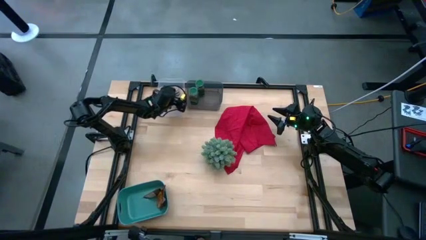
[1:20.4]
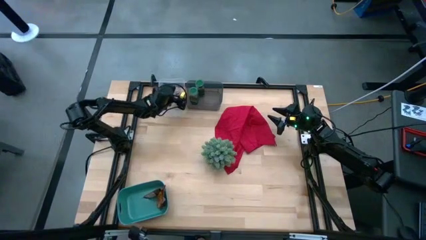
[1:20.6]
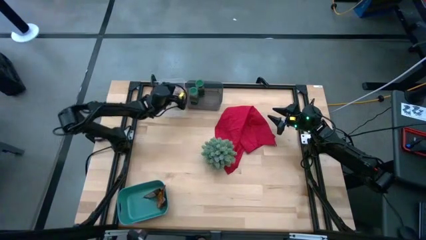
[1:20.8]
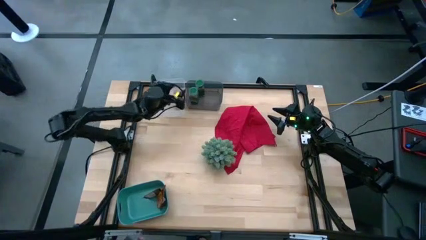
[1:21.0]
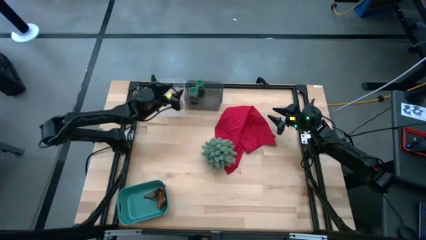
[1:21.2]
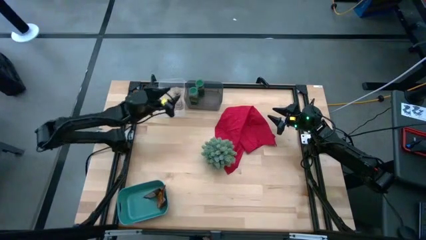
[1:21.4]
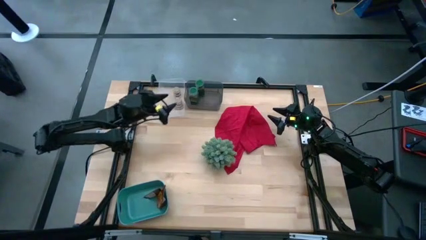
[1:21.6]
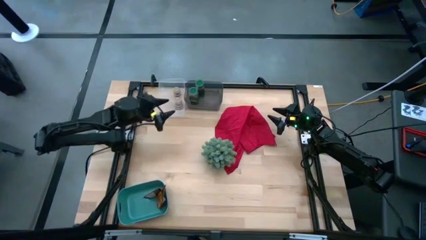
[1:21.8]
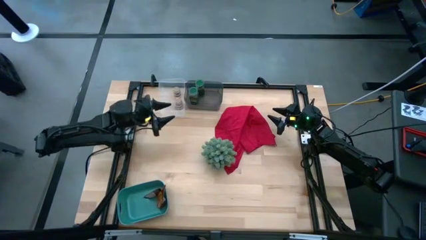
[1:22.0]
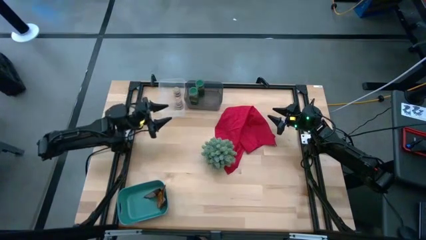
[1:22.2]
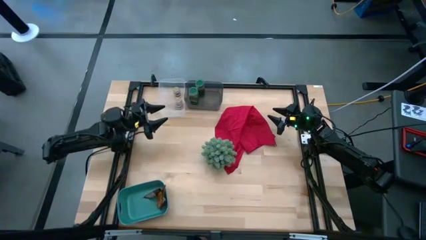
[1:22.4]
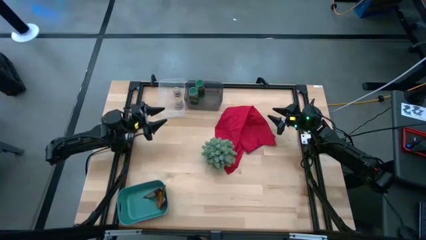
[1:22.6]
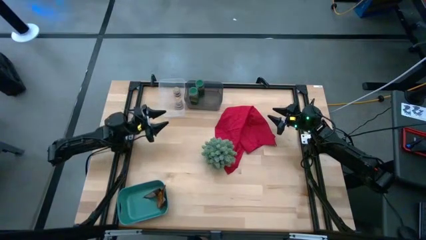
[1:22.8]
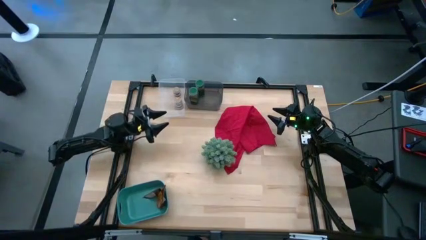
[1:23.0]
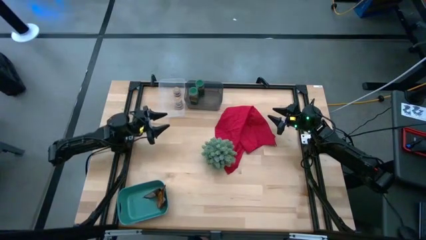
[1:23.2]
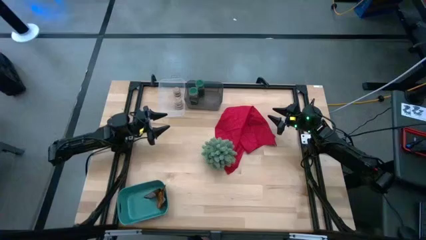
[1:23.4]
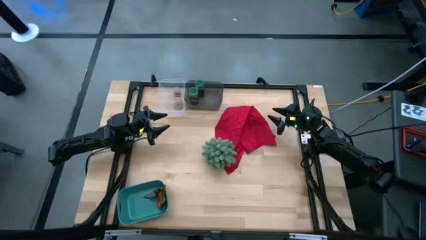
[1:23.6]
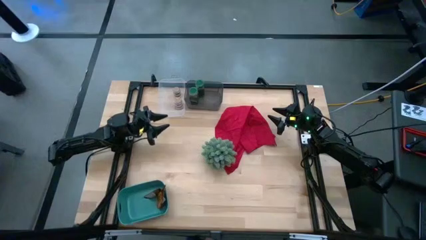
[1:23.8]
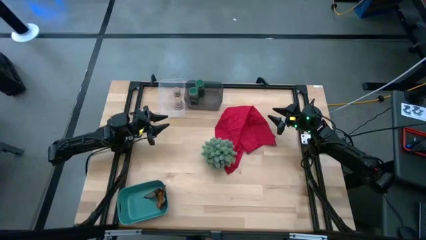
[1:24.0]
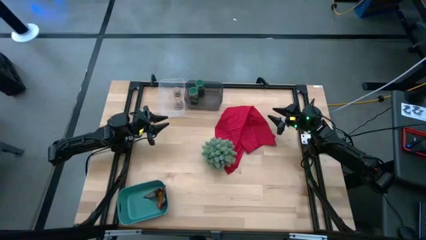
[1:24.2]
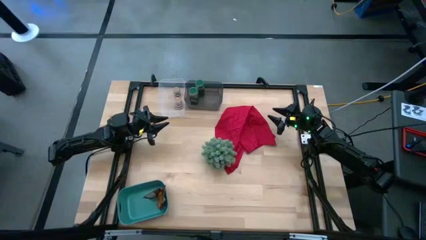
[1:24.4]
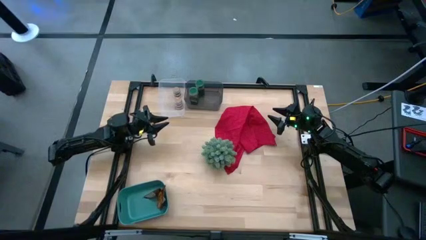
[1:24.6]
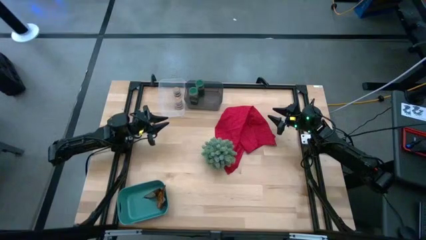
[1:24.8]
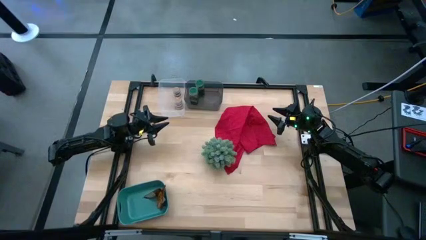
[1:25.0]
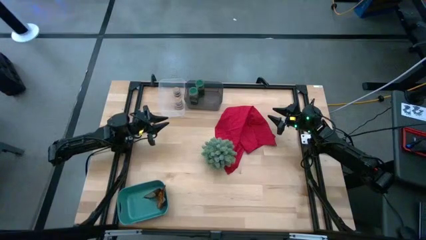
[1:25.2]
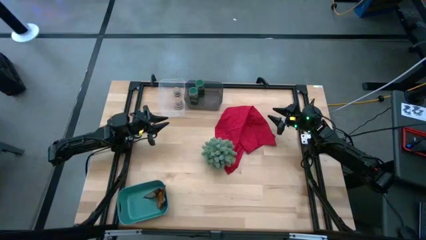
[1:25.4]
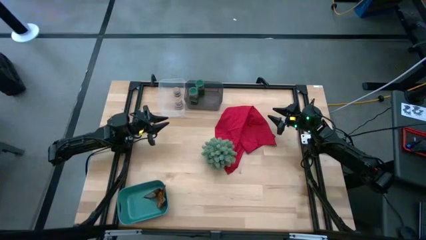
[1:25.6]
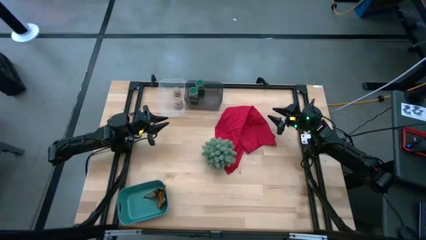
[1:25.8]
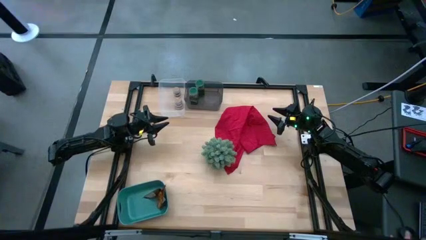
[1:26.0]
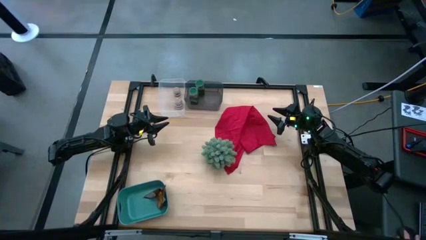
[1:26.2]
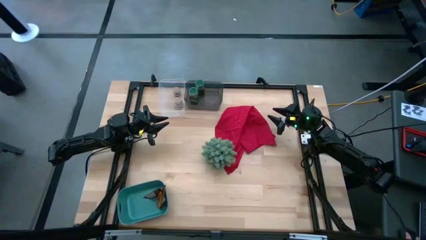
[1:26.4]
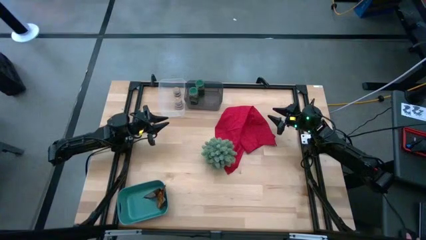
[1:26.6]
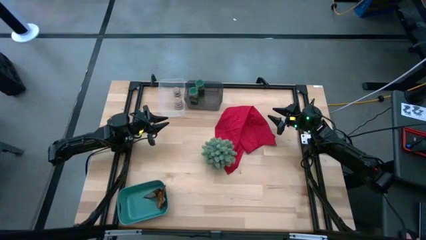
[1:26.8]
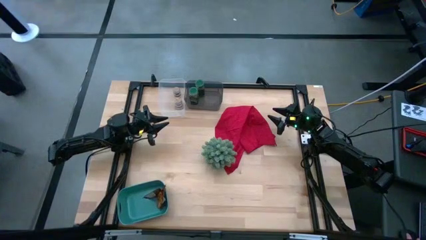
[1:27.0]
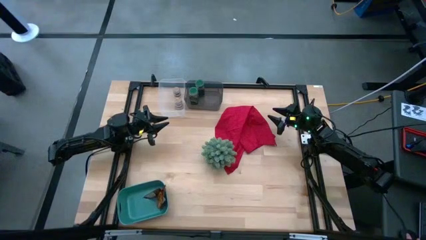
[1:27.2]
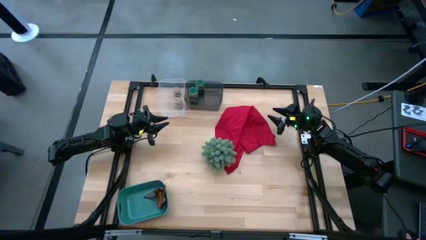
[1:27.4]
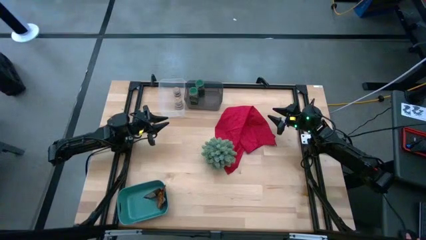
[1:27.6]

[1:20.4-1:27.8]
Task: Sort spices by type
Return to Home Position

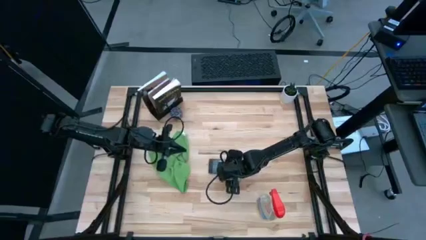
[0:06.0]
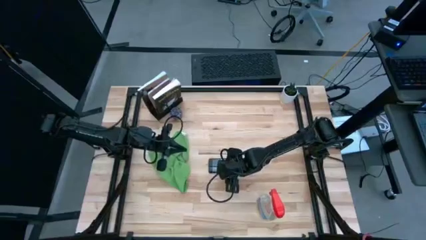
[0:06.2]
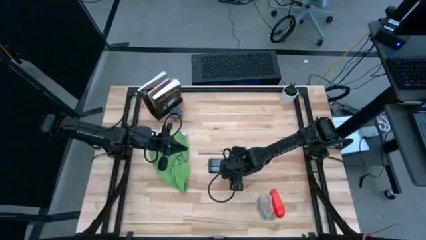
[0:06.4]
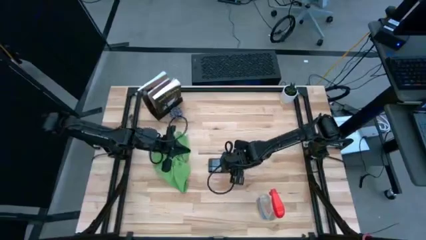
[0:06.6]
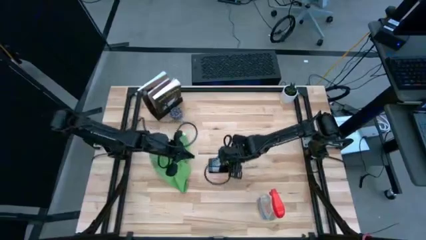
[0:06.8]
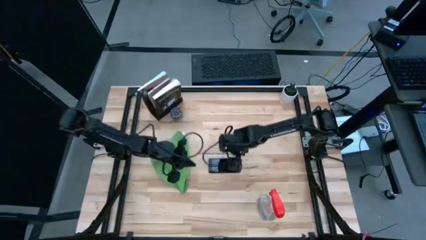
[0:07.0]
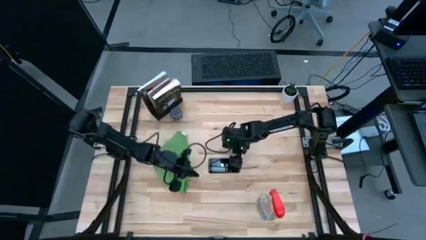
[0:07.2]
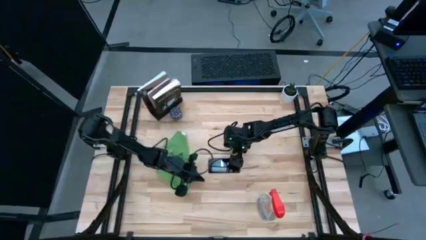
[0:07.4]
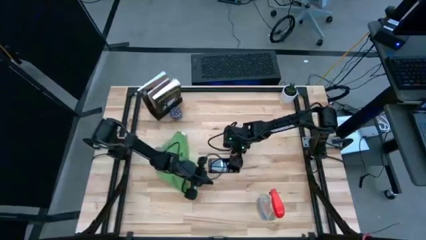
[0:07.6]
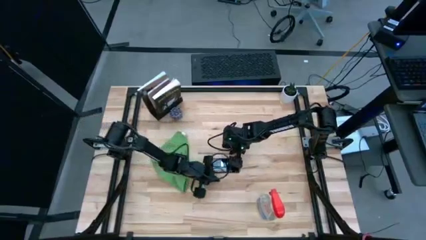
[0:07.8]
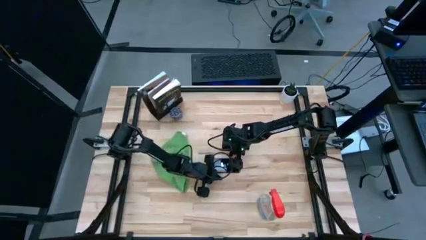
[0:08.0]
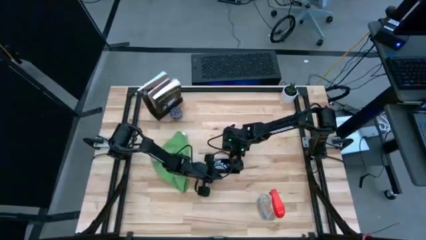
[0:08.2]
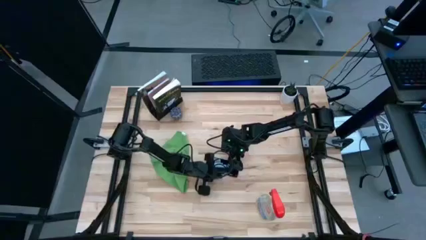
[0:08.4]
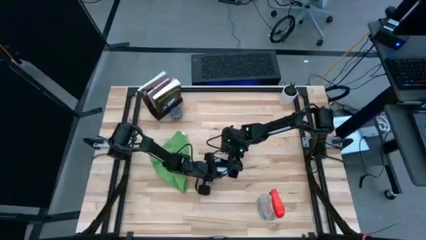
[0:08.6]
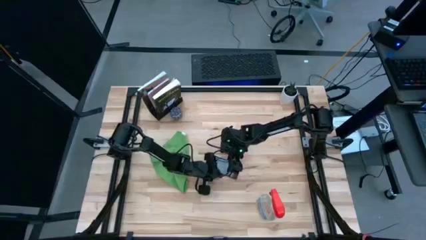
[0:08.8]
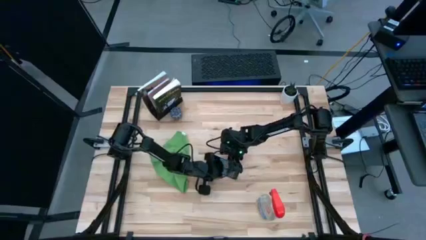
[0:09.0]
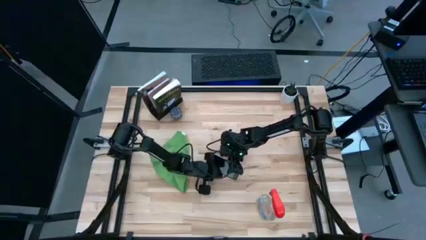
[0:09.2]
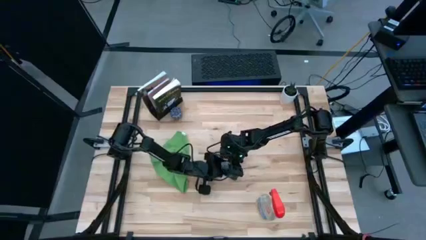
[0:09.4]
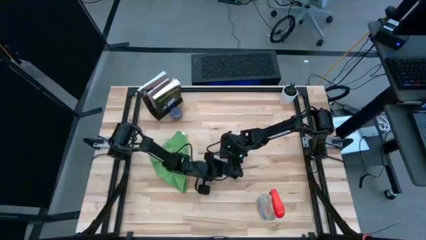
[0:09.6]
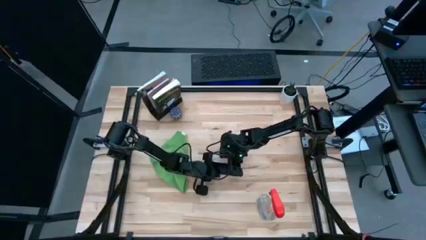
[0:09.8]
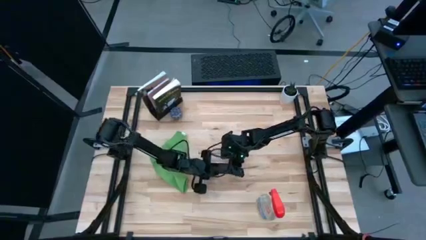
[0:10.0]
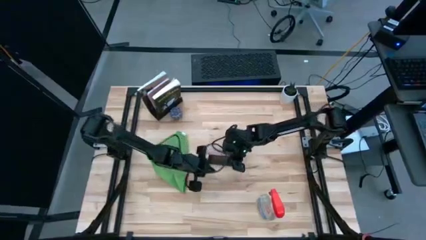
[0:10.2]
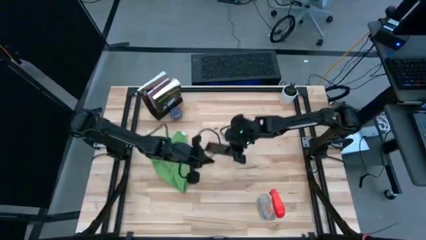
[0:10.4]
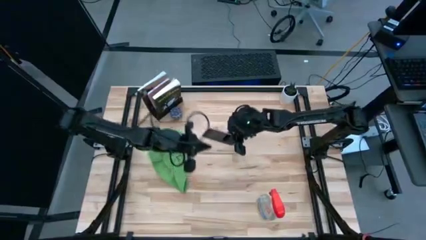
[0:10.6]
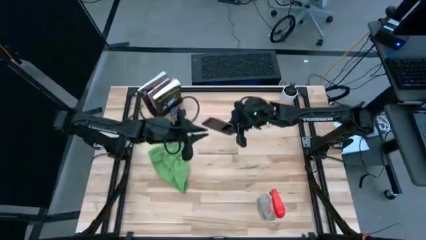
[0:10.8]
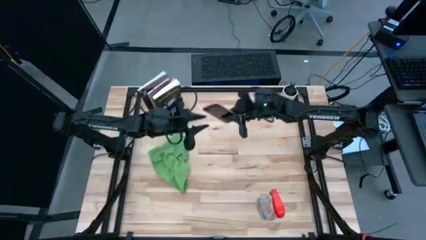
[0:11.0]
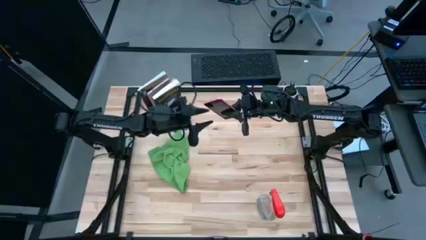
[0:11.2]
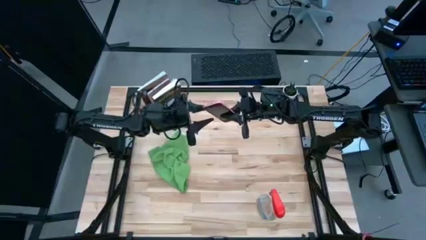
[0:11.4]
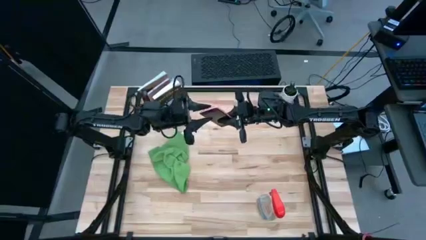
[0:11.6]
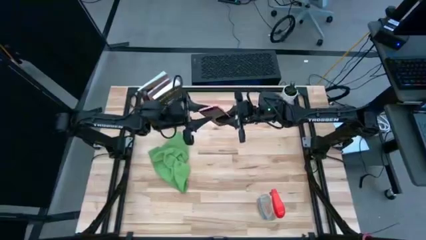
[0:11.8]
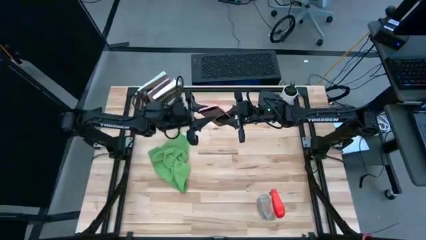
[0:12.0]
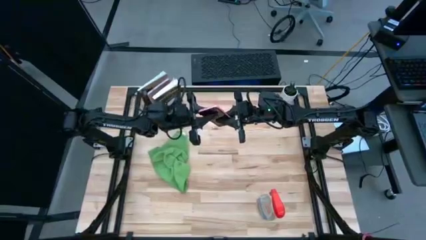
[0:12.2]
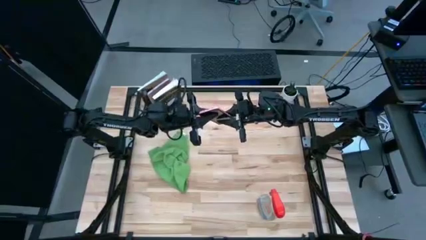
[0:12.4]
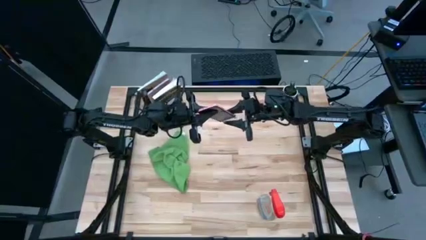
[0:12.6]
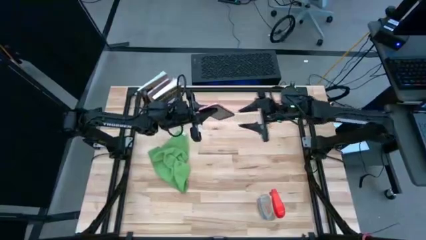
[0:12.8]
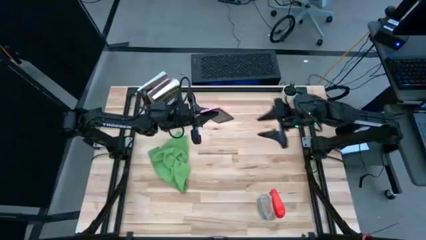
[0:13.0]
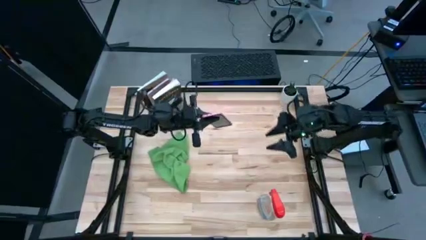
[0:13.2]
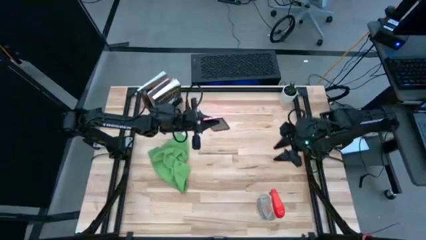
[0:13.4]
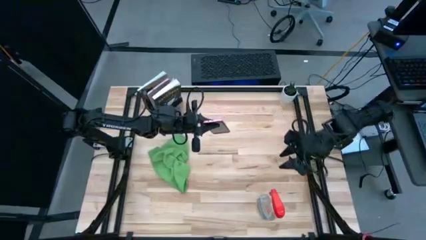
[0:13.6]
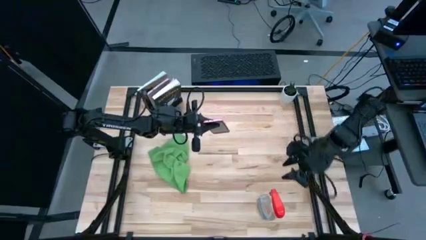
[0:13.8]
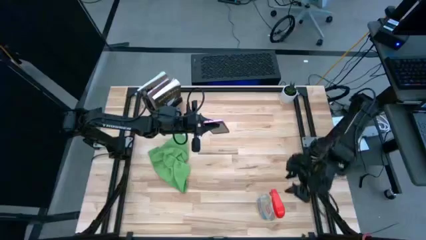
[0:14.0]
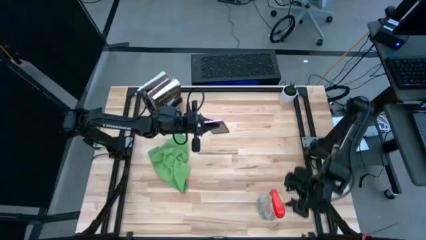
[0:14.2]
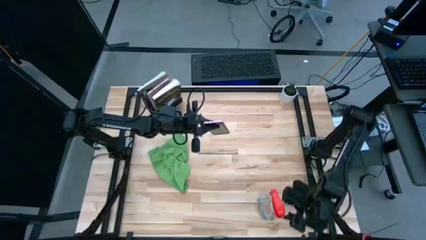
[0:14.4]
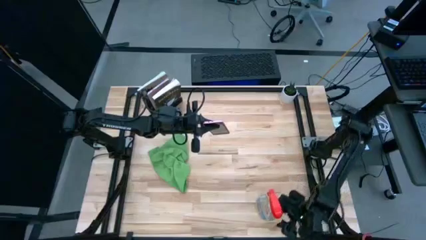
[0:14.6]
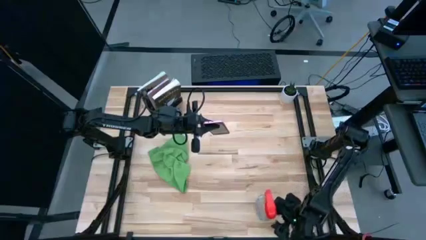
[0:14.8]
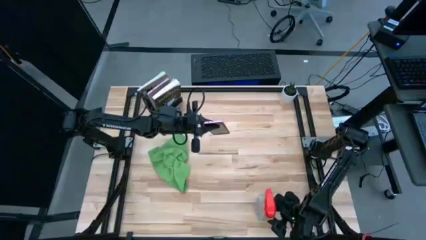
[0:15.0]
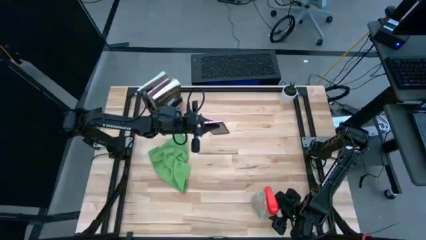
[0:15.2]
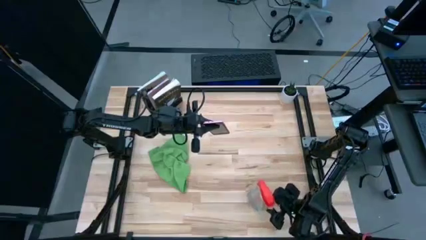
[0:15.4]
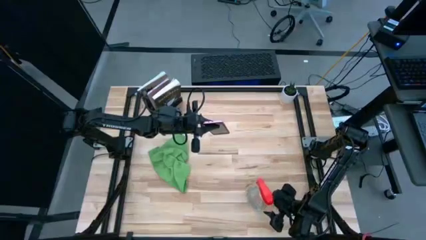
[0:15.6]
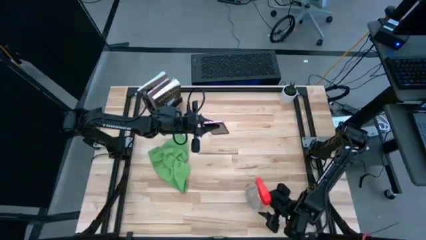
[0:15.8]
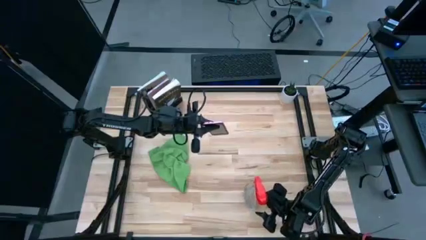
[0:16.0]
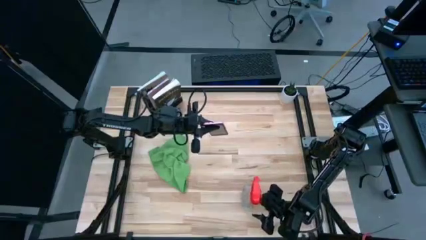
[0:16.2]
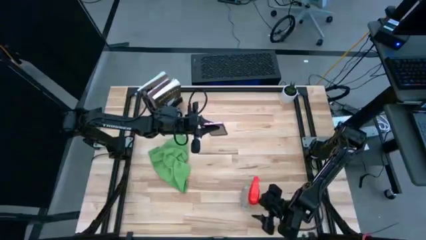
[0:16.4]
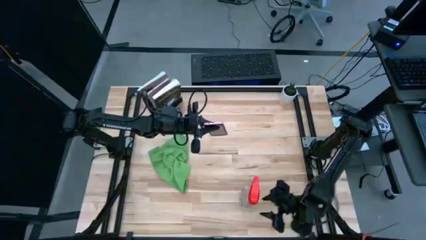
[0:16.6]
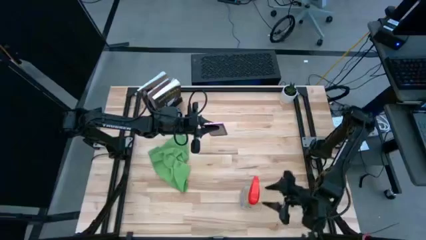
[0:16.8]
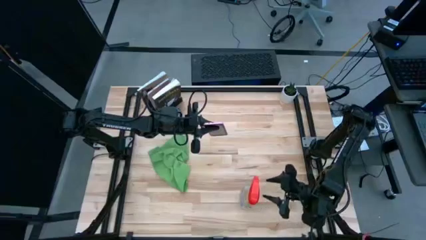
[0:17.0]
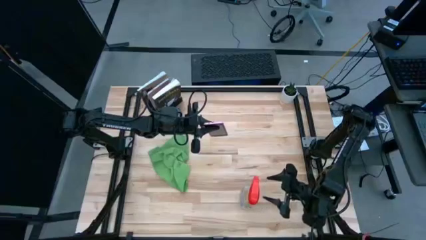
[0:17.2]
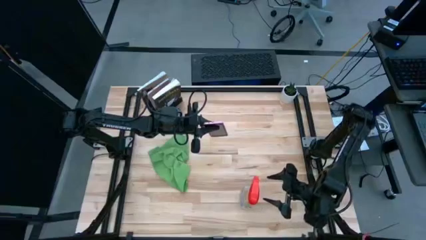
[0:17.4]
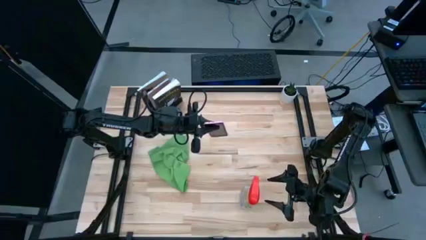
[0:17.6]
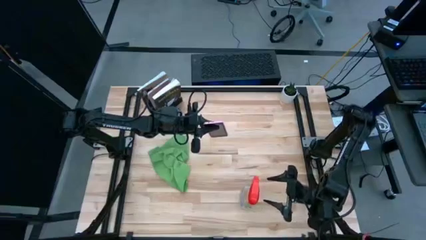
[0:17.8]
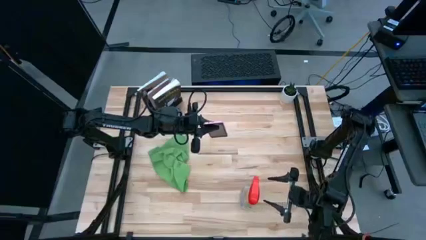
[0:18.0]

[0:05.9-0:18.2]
Task: Apply microfiber cloth
Spray the front of the pink cellphone with the red spray bottle
